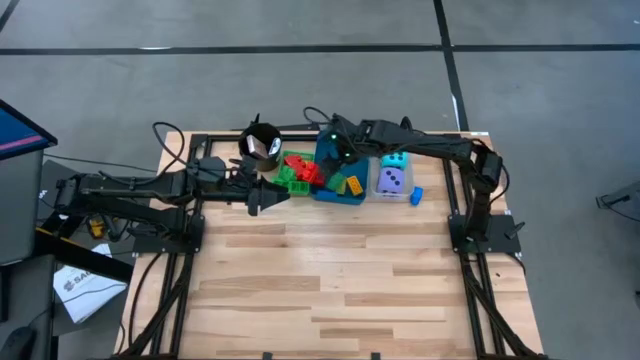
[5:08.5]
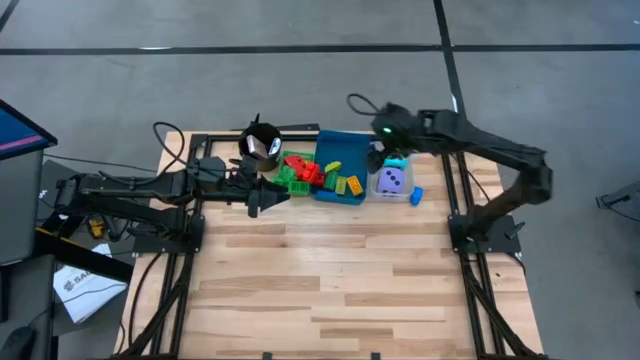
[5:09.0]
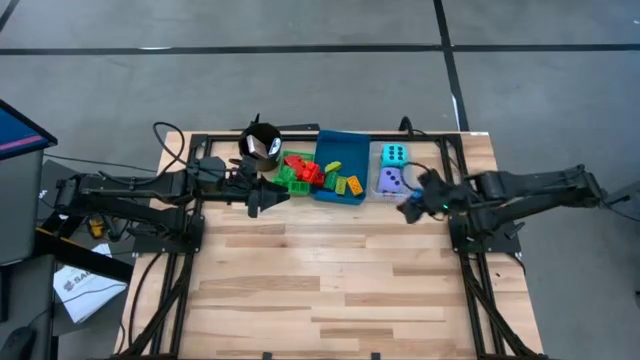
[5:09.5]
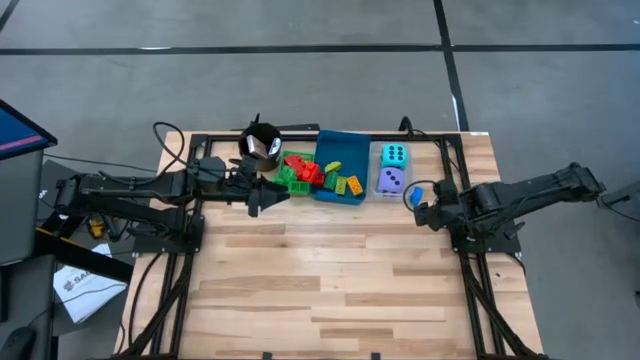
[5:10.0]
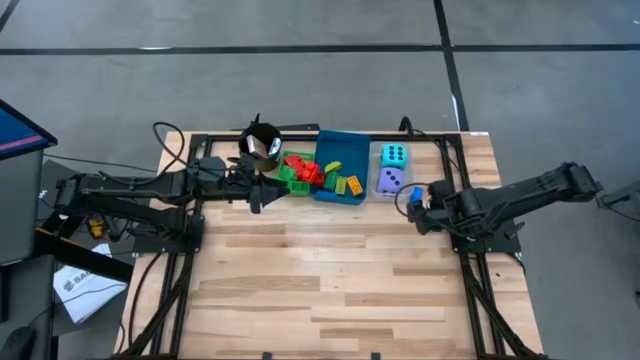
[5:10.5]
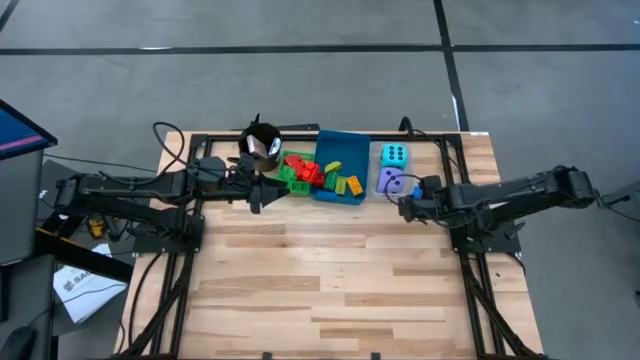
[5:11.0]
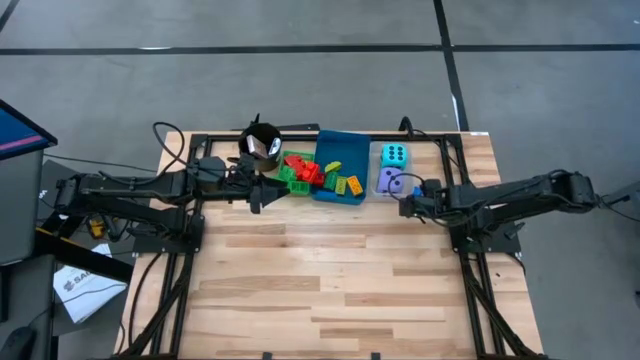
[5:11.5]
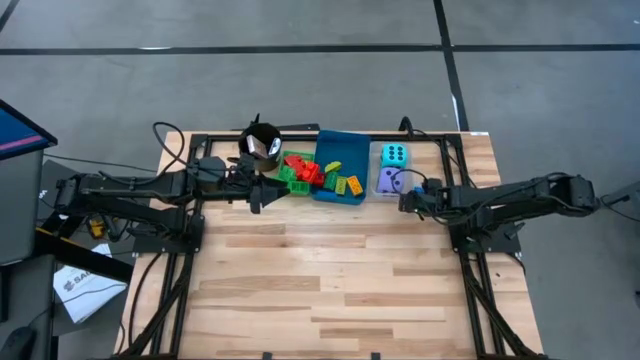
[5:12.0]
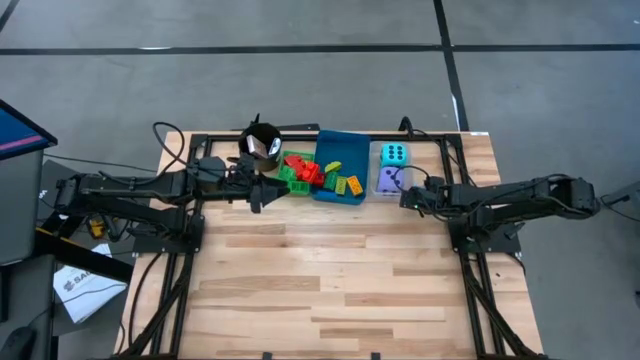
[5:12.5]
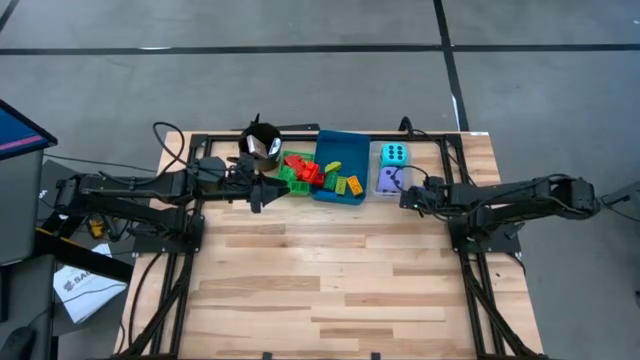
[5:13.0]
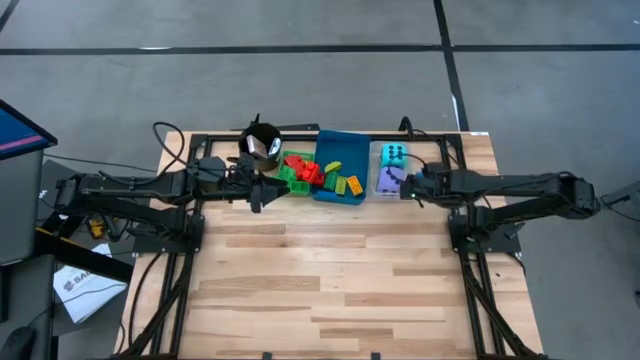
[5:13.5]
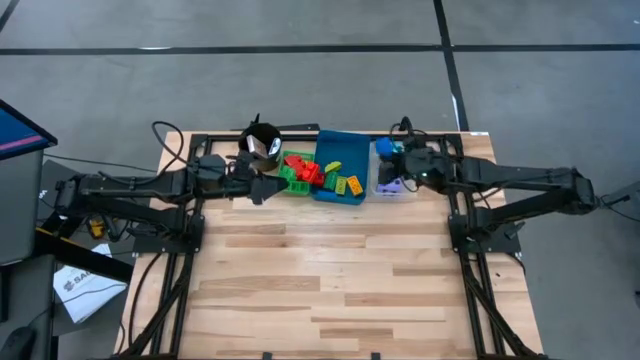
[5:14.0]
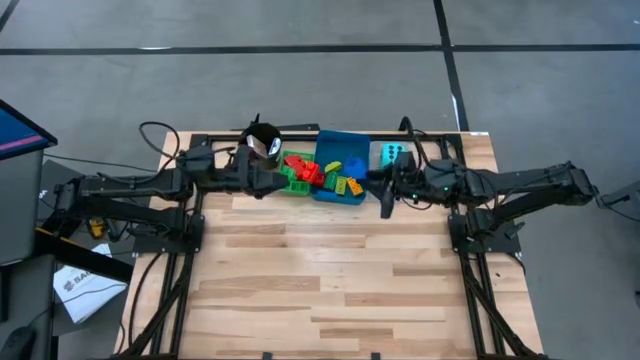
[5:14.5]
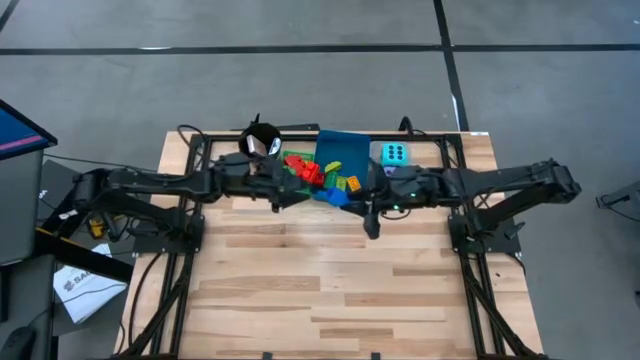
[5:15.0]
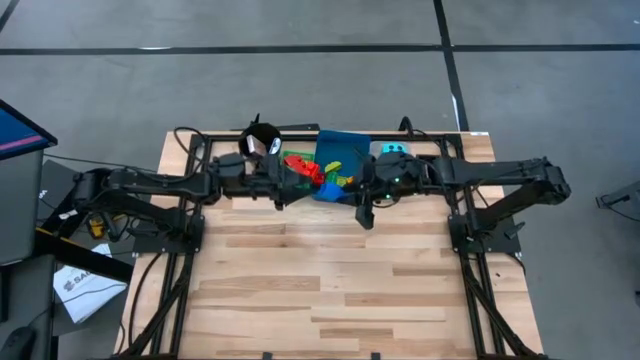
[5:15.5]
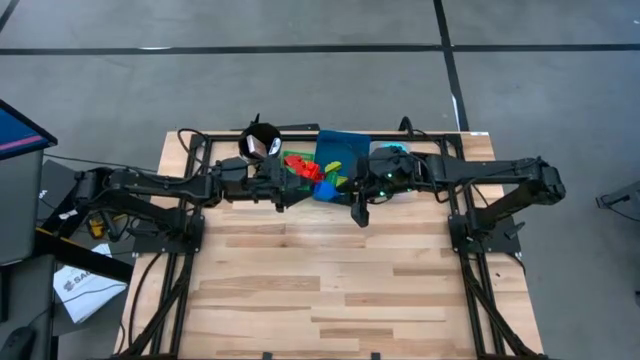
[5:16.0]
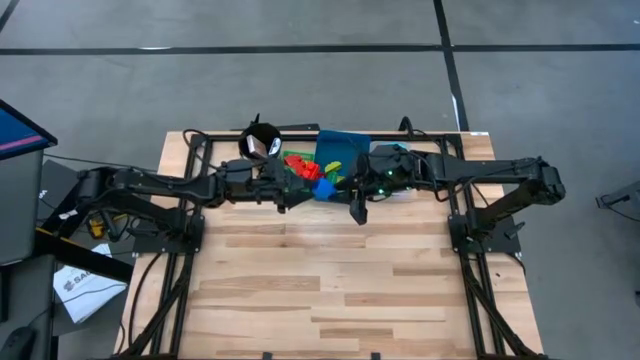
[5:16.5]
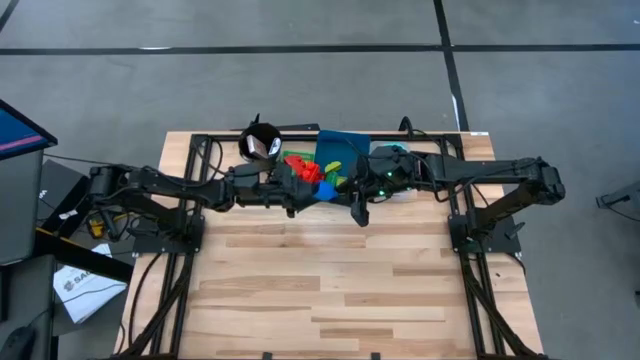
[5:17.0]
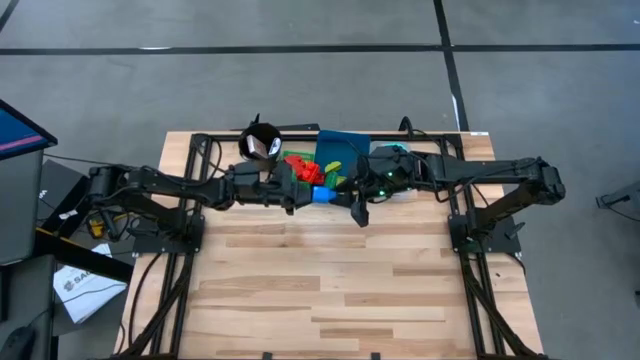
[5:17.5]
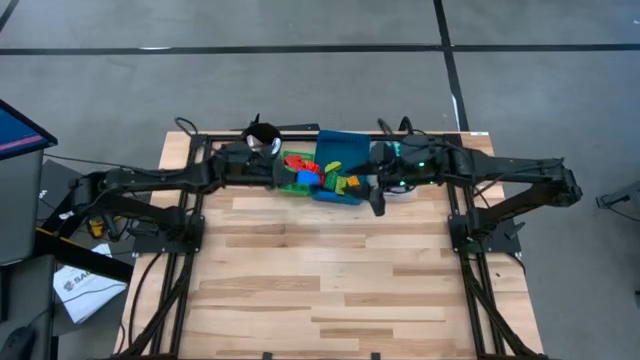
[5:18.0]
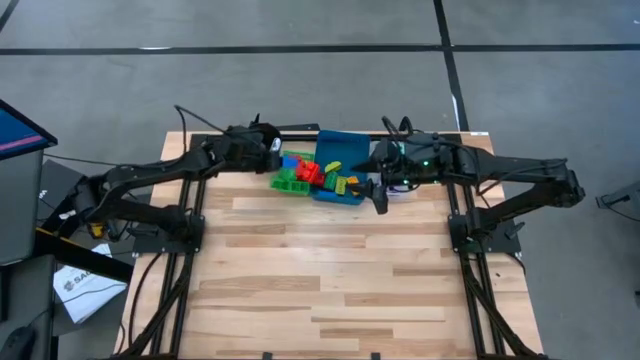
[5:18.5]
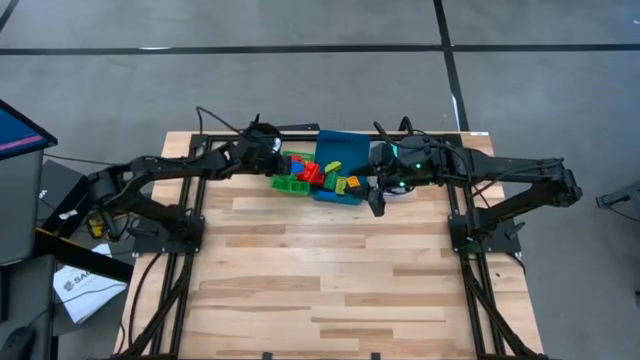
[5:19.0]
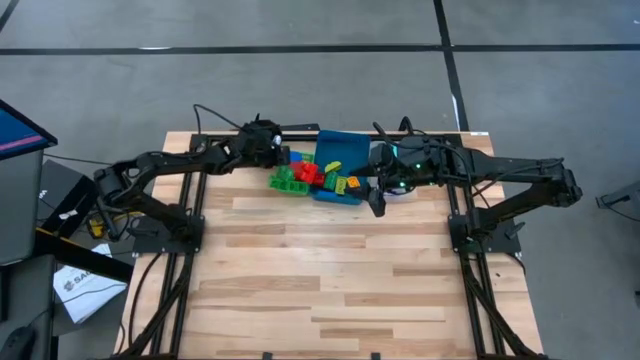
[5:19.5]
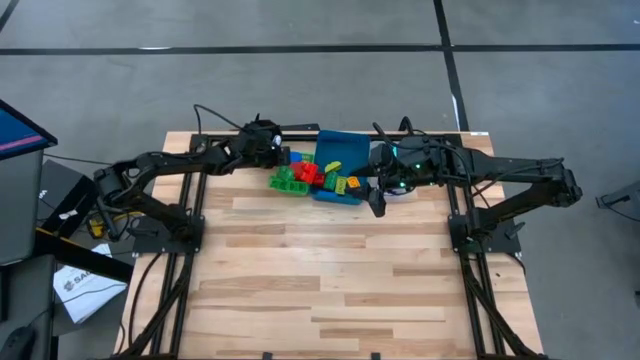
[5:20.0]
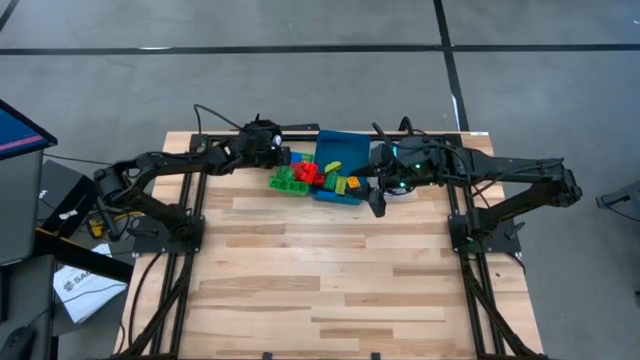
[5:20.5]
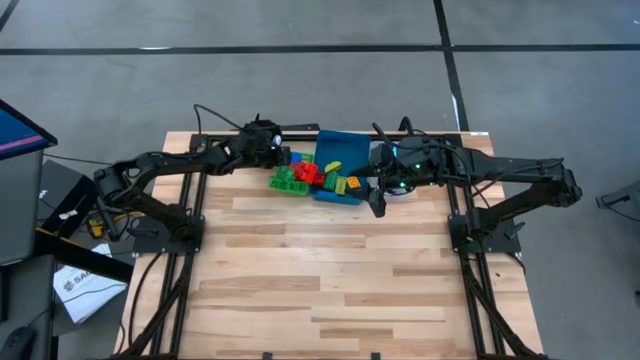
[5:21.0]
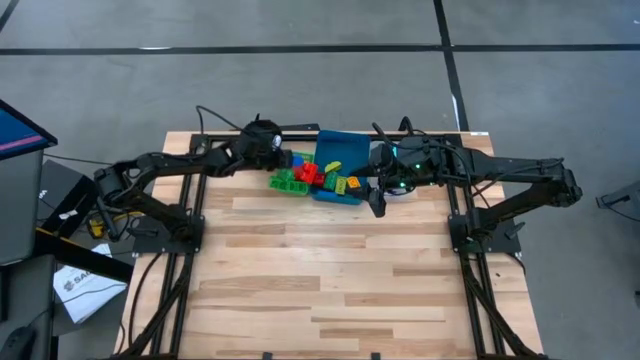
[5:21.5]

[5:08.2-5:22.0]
Task: Pick & Place Toys
Put the large stud green game piece into the green bin

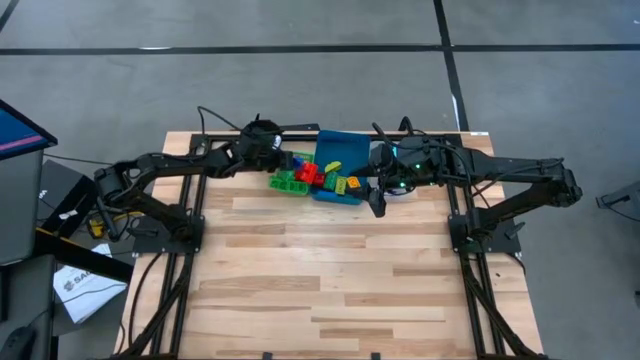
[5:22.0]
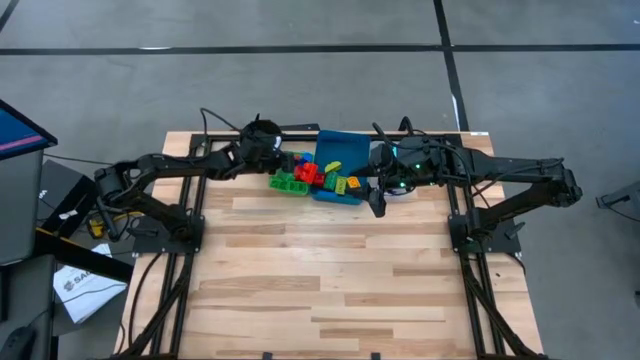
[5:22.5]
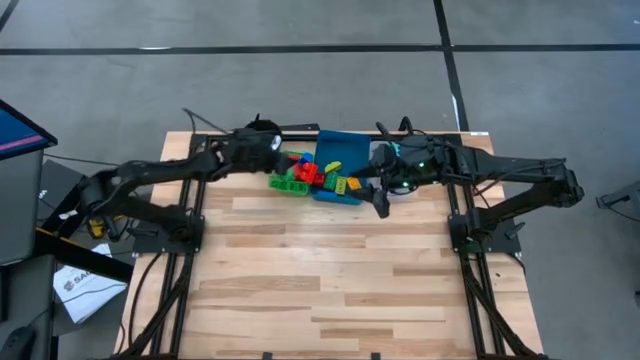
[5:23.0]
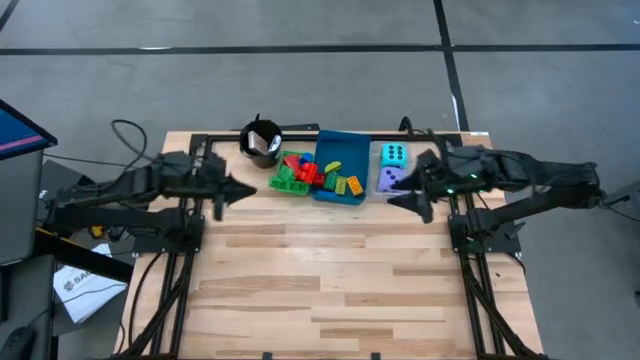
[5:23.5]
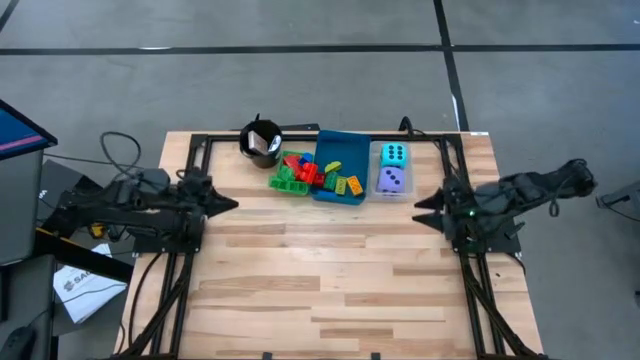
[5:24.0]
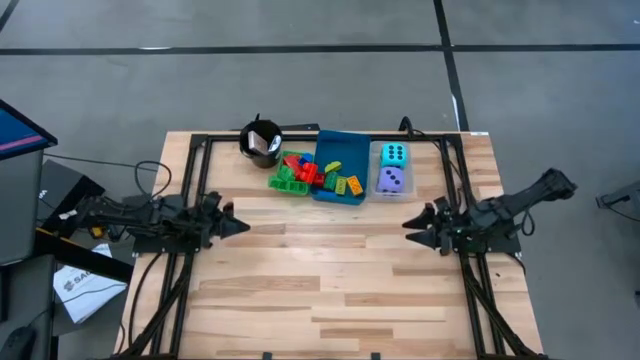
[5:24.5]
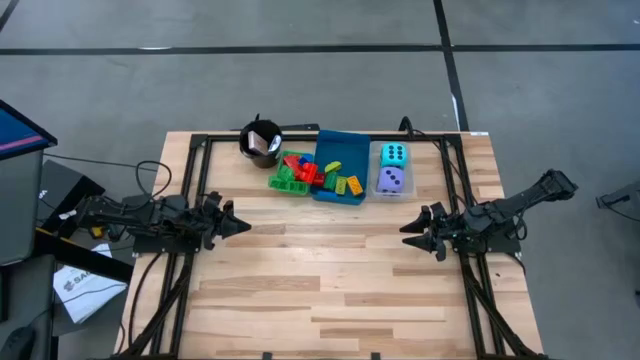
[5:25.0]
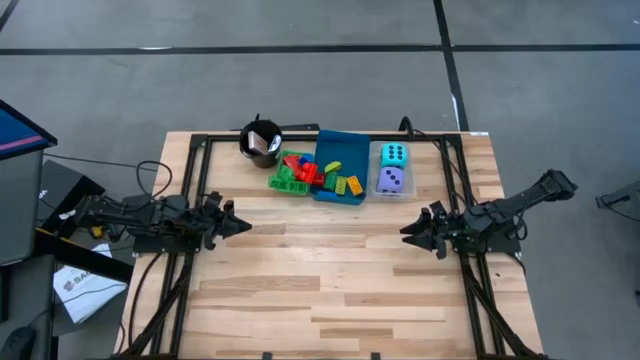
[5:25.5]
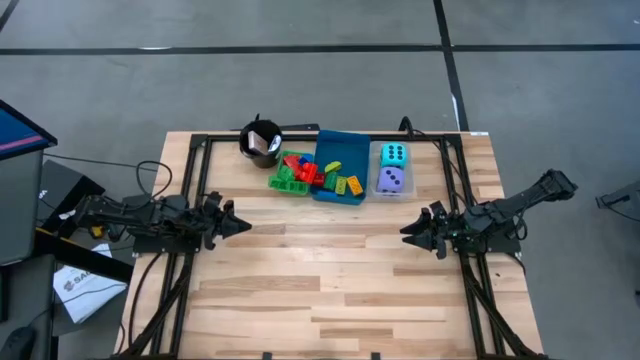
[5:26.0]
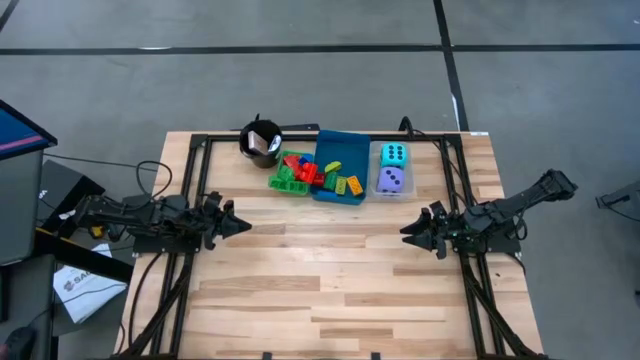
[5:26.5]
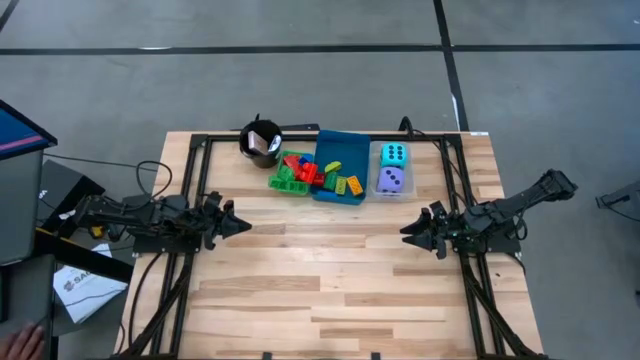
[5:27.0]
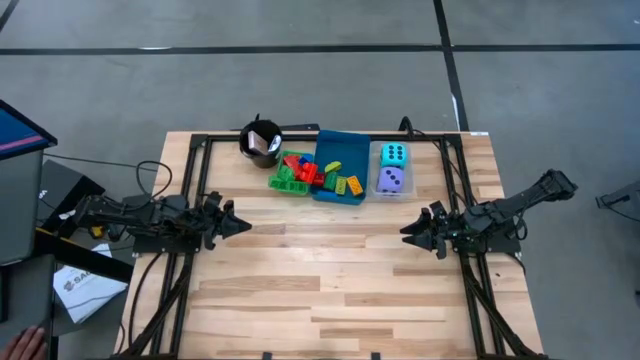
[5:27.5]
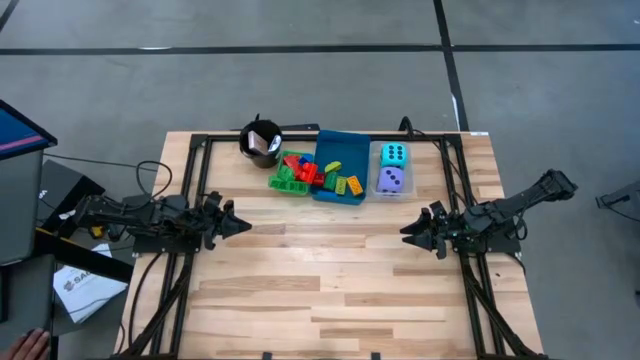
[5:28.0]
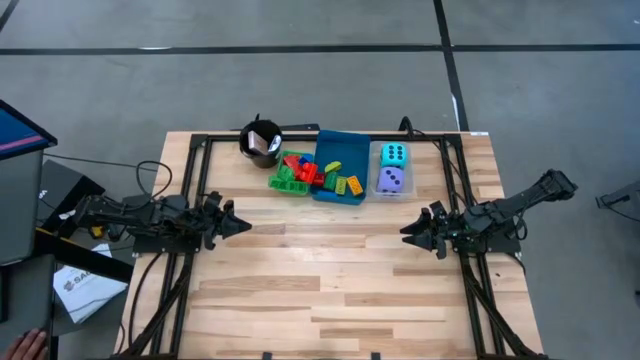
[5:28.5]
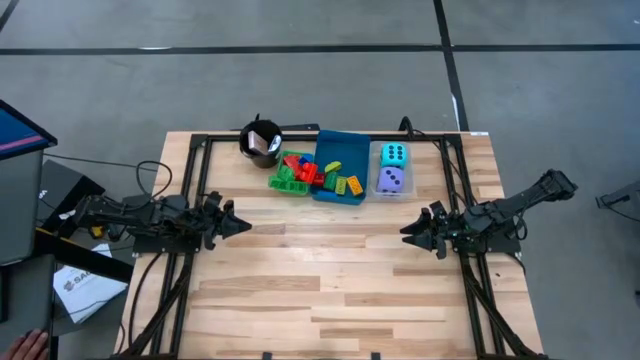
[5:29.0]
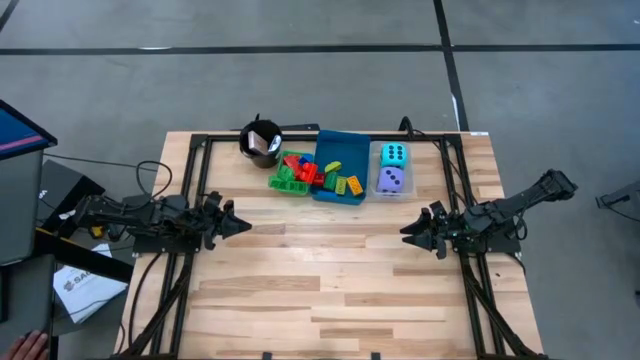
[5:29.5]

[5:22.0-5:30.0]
Return to Home Position
